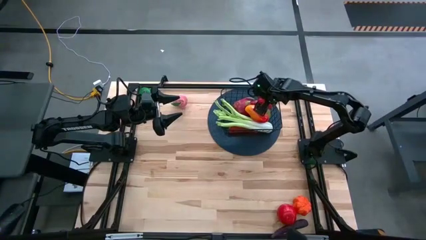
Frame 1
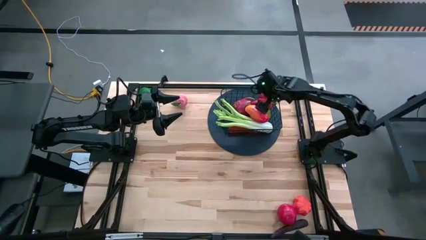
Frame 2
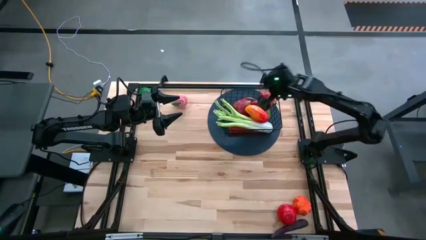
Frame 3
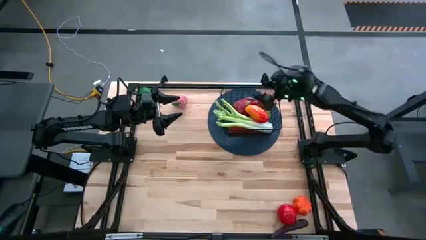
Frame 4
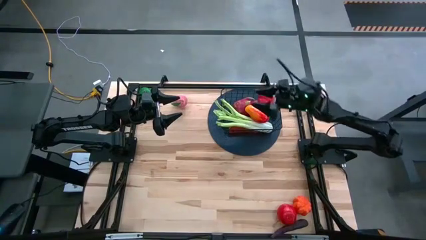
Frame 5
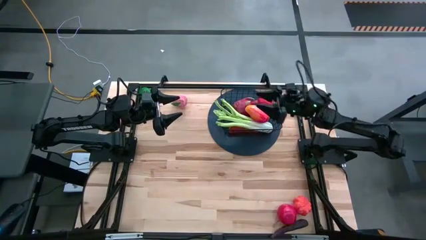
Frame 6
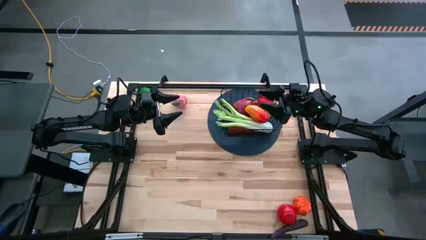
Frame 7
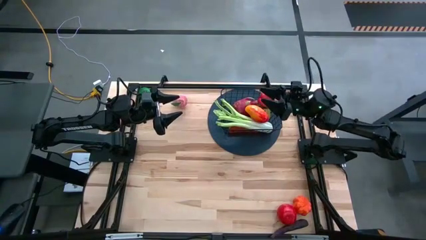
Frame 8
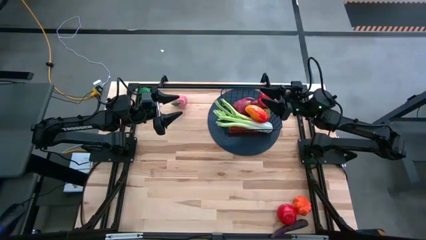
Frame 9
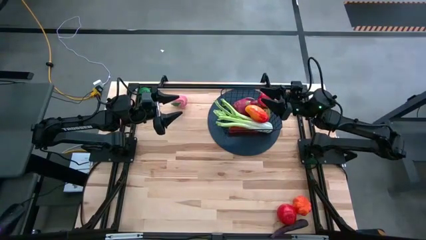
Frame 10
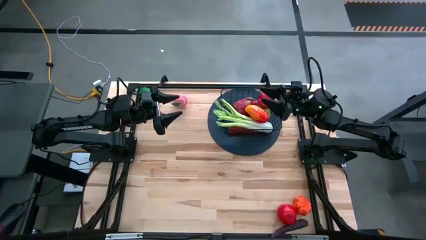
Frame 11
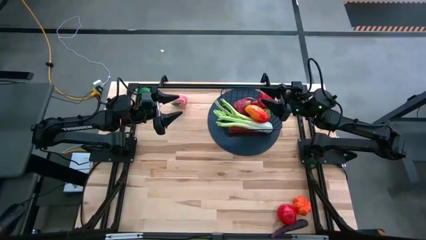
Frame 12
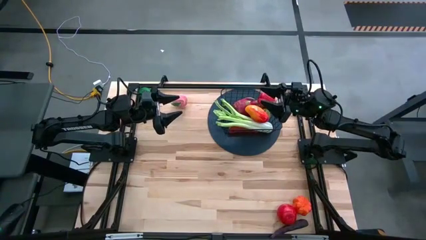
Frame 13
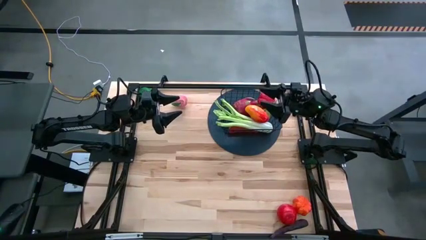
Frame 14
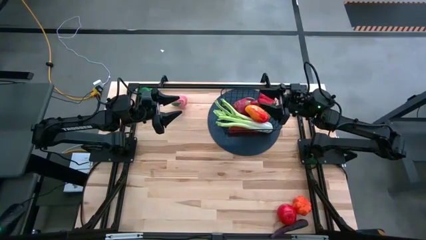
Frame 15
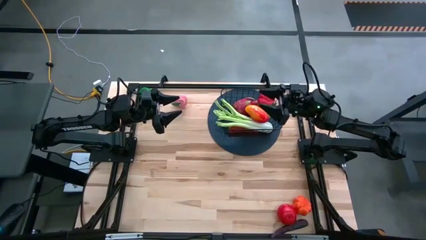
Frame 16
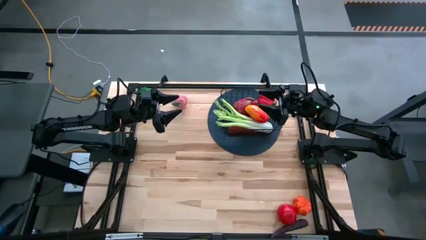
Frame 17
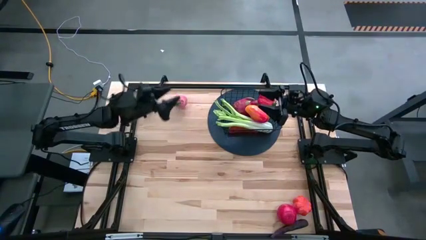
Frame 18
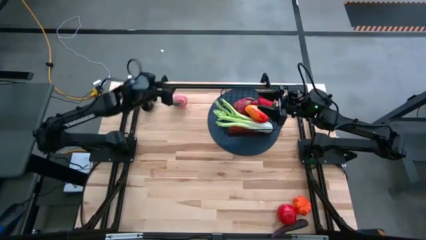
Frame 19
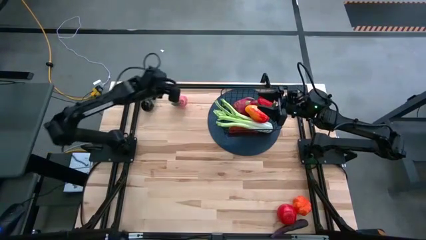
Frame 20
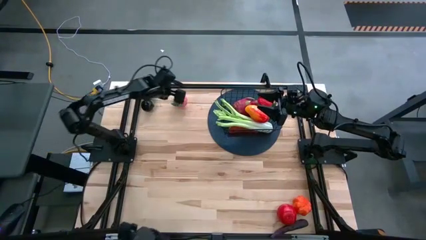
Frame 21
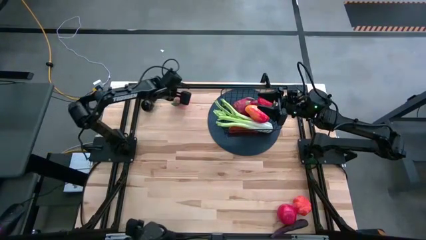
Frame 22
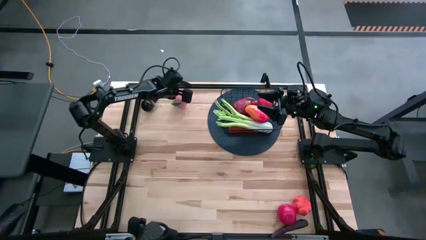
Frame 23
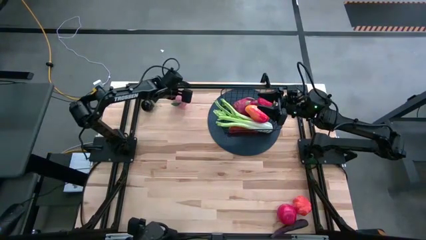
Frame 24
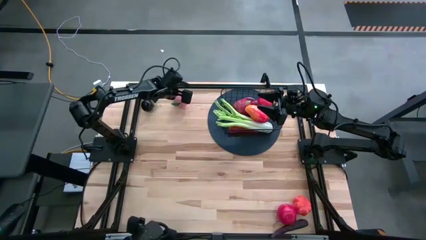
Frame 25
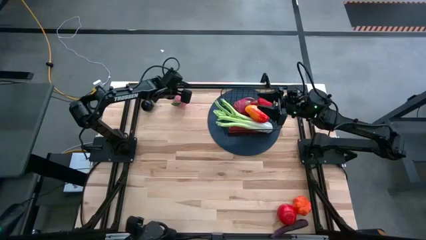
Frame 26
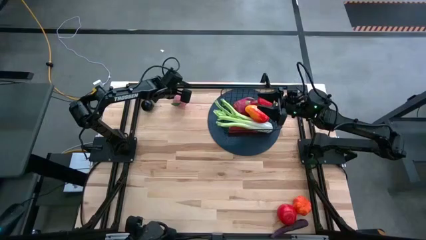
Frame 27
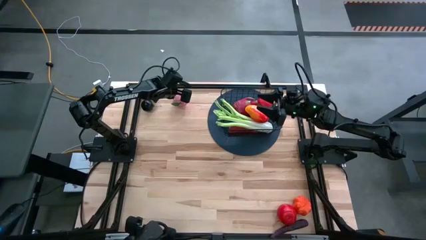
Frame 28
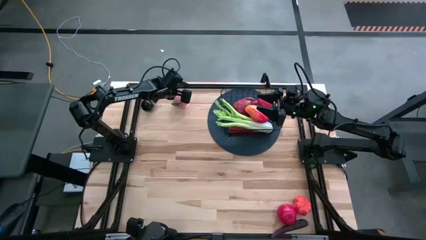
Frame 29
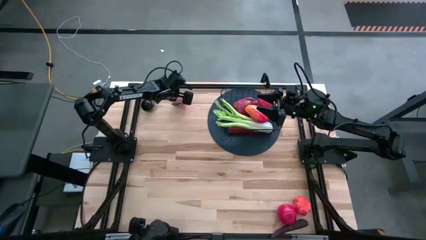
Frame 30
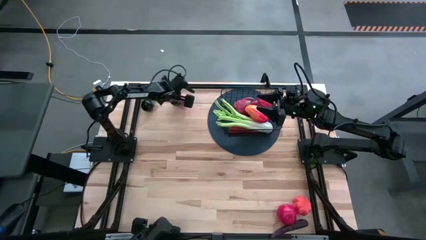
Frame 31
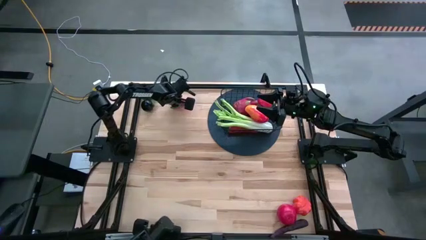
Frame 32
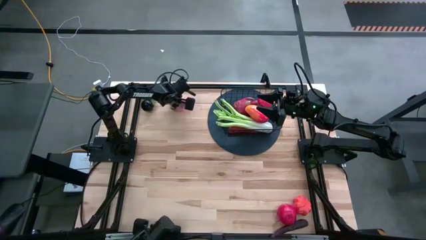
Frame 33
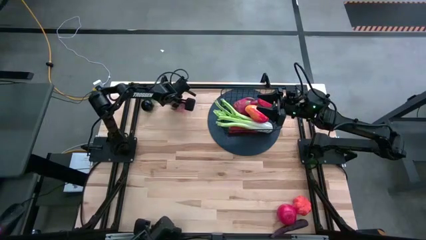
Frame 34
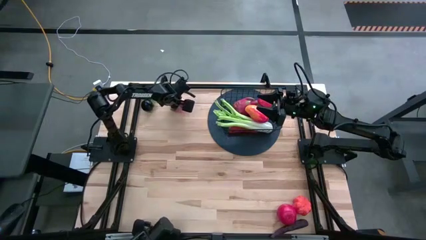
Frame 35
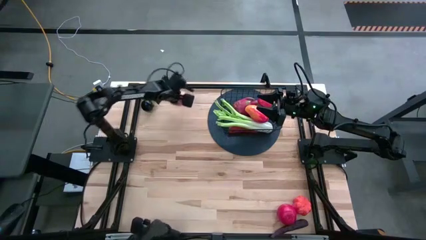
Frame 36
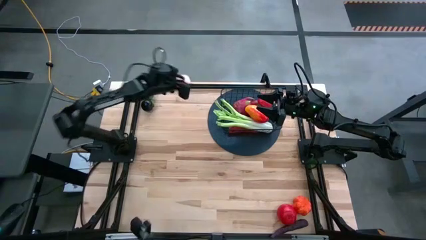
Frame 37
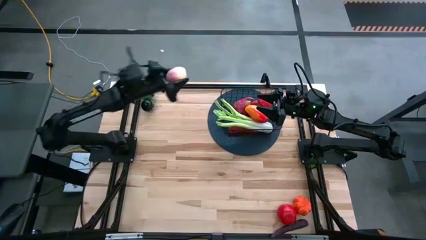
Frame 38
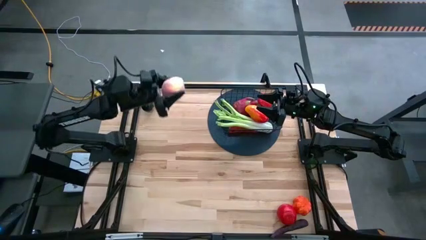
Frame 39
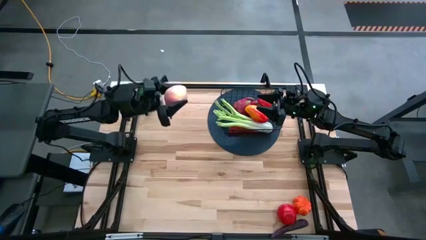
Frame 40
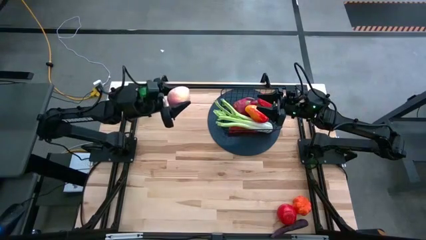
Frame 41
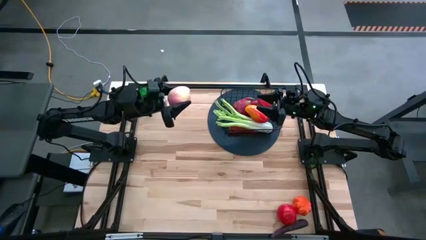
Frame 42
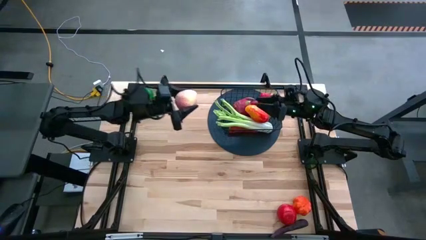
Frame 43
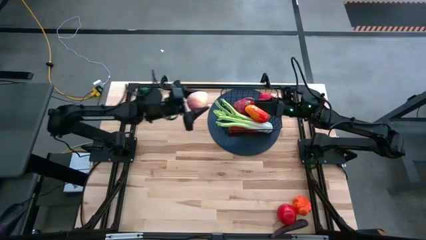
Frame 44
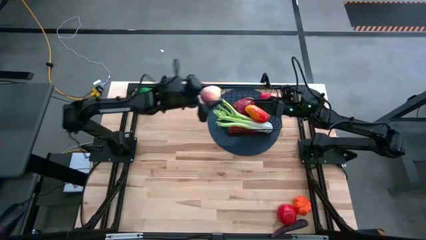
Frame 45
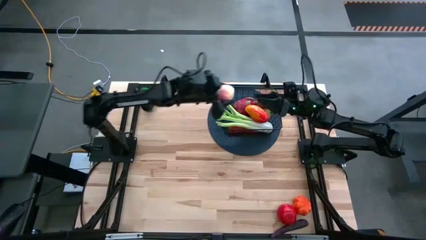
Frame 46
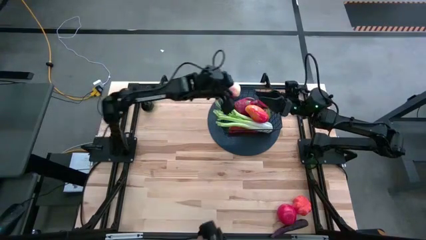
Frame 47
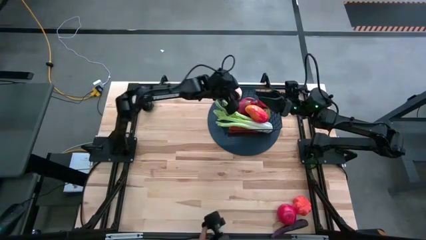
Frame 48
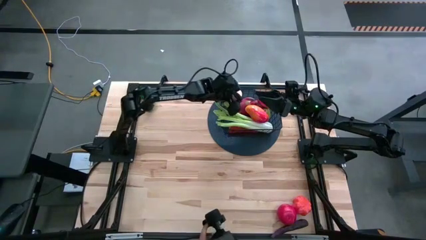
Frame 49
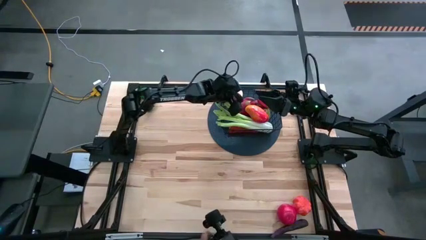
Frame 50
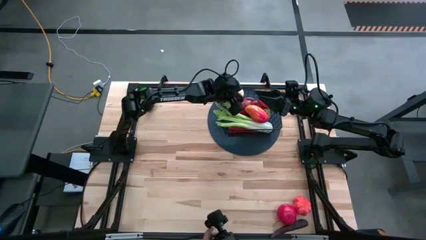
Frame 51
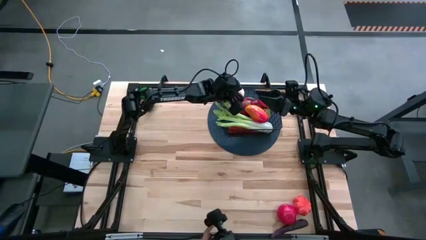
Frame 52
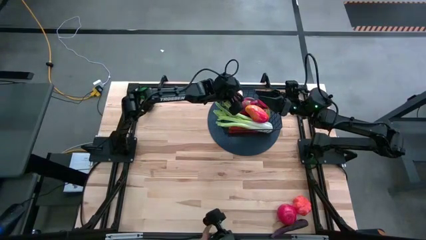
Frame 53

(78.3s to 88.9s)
Task: Build produce basket
Put the peach into the black wire basket

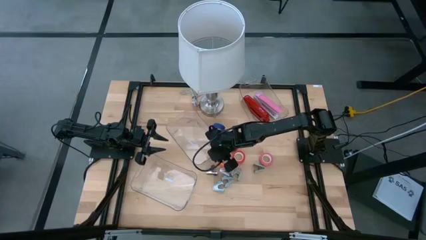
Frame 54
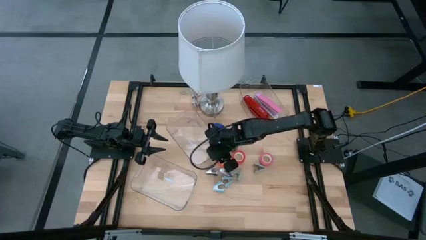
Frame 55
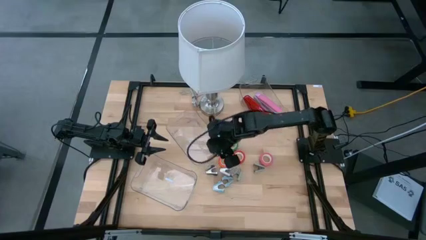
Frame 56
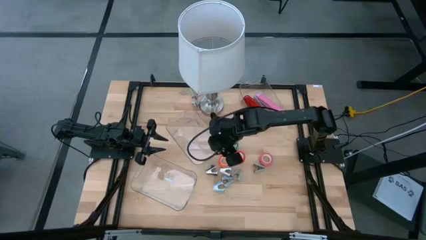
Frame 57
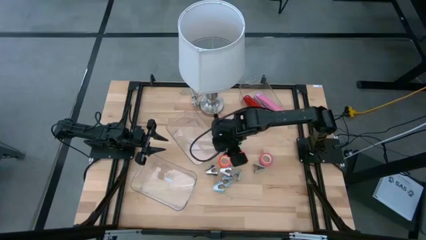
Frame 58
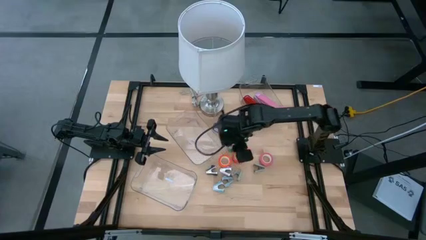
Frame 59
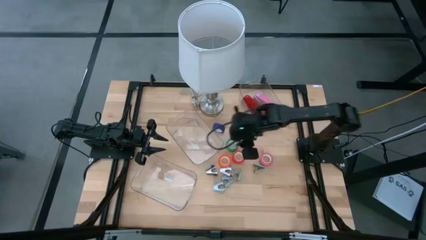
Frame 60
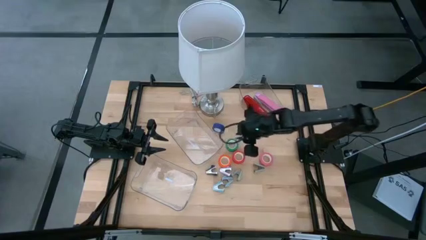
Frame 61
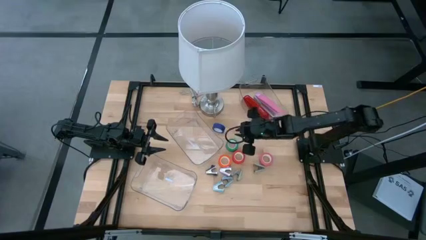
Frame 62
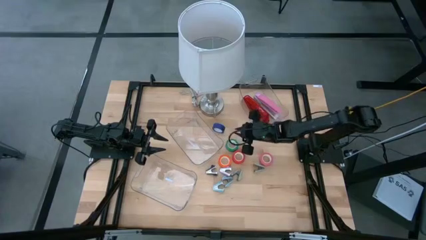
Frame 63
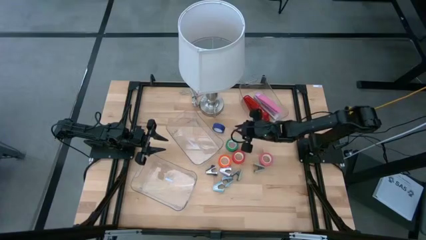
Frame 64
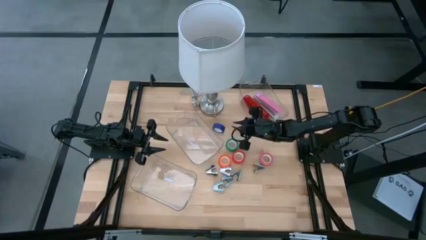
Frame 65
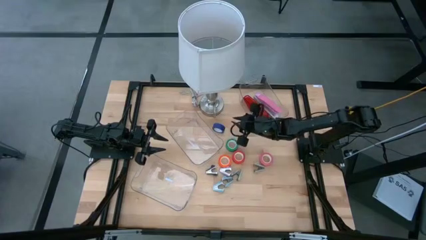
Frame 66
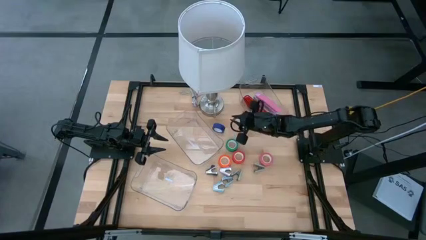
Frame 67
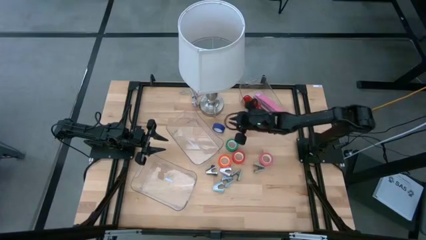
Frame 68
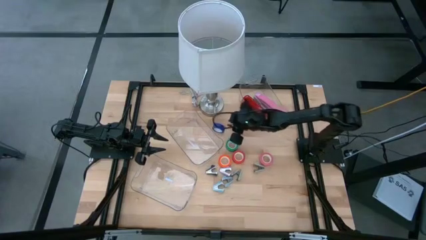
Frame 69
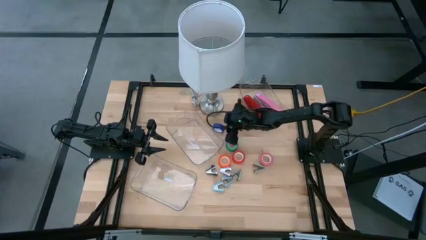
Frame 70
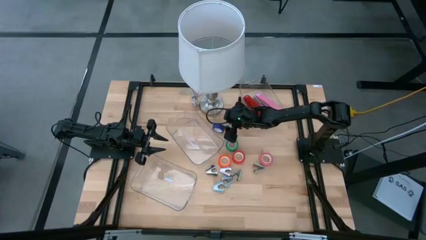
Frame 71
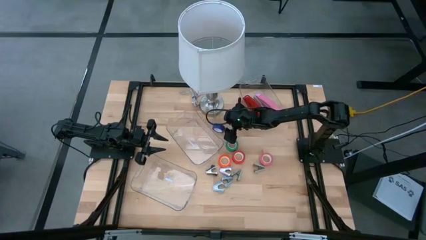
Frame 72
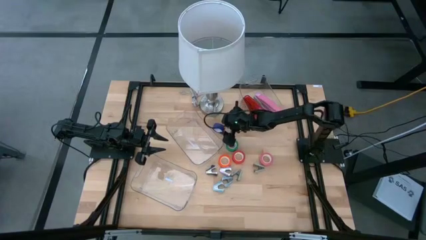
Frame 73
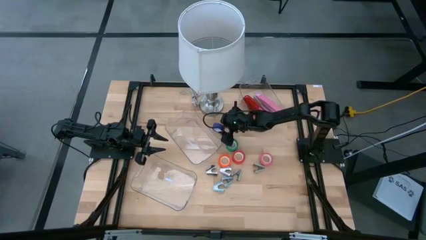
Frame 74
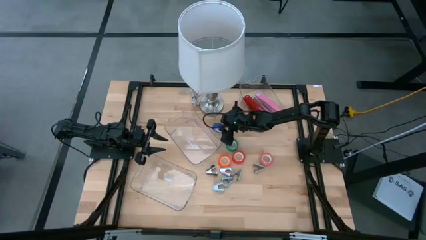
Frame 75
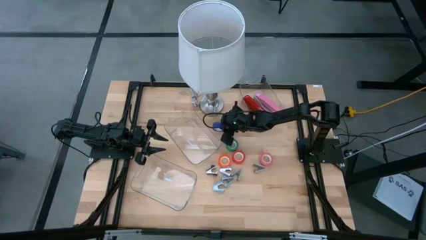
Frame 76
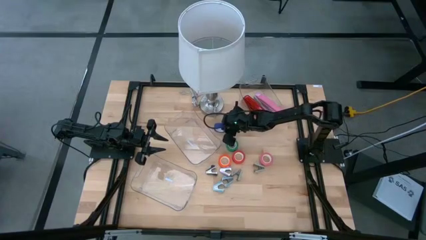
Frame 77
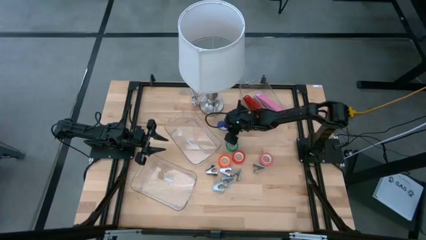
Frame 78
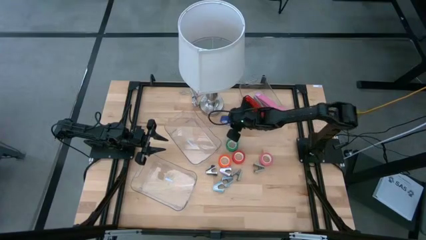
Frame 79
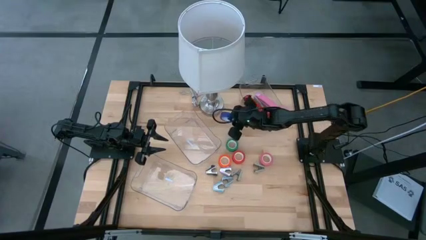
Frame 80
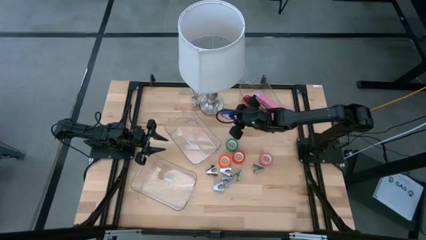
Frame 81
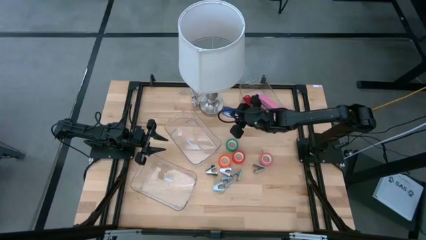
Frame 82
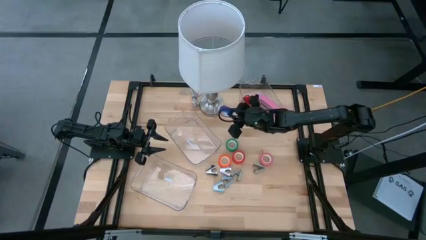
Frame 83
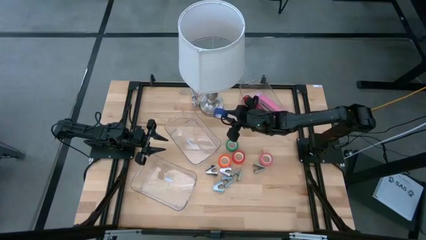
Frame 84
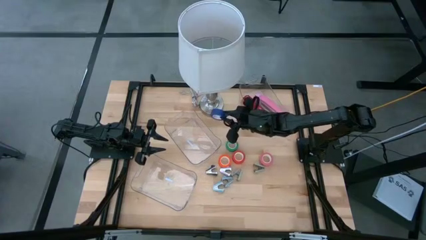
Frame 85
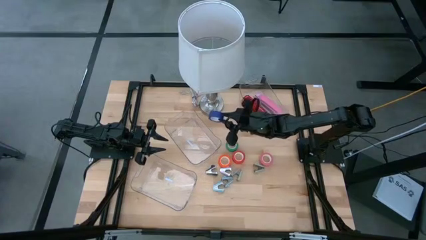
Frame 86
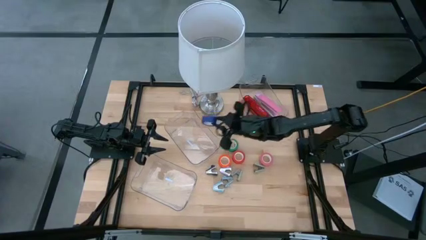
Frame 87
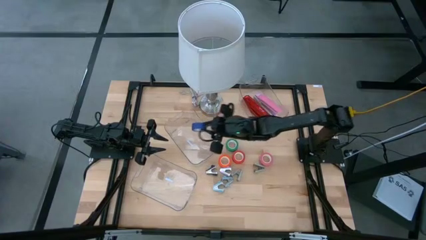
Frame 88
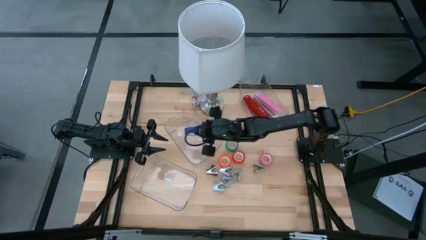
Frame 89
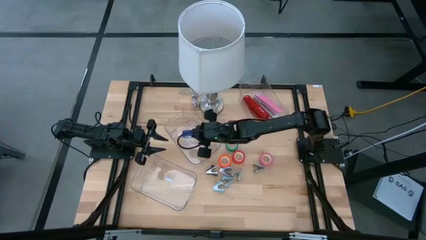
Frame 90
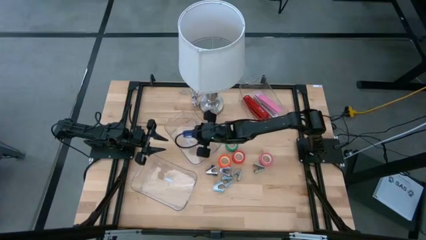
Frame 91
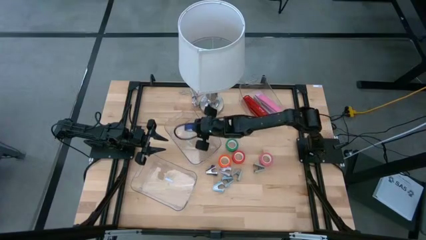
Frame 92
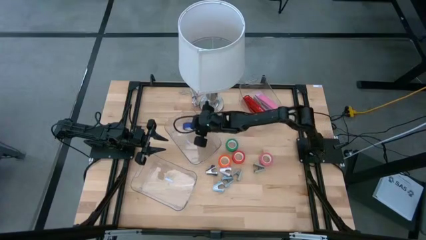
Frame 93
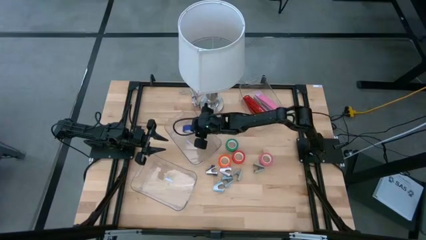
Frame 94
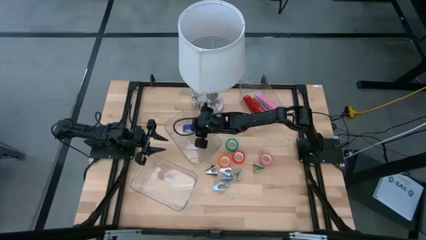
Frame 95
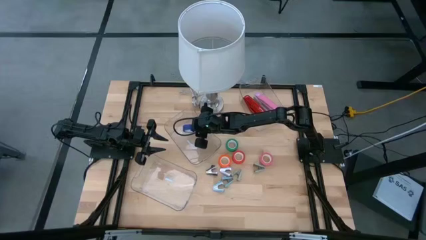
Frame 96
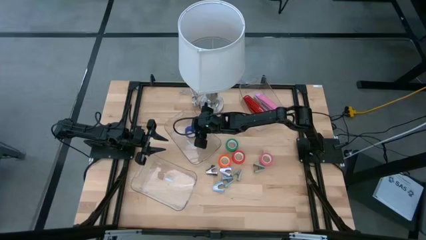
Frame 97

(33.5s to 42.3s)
Task: Pick and place Stapler, Stapler remover, tape
Put the blue tape into the middle transparent bin
